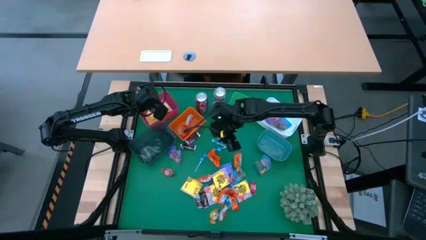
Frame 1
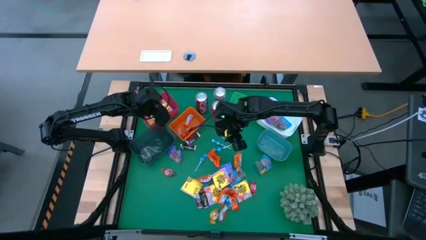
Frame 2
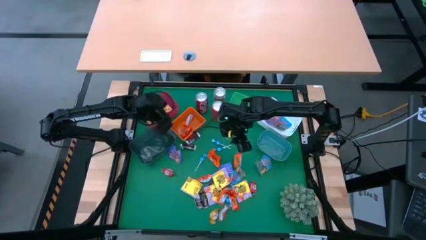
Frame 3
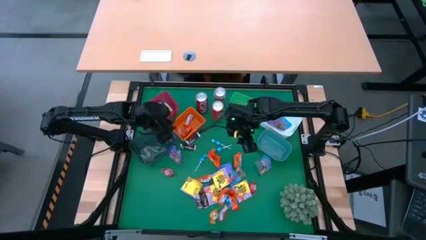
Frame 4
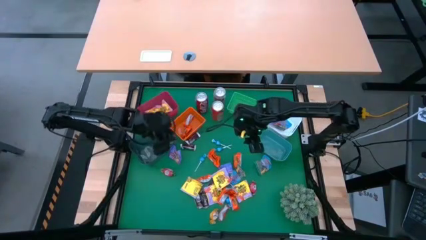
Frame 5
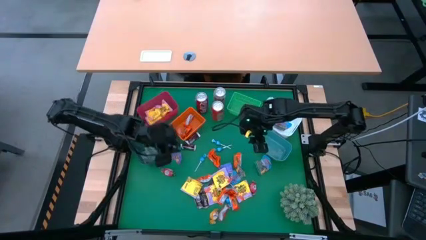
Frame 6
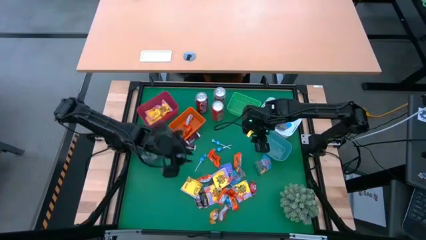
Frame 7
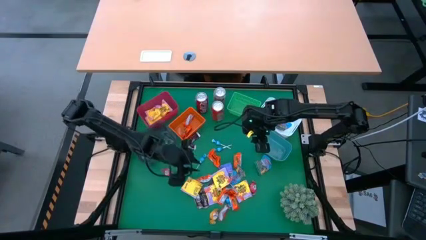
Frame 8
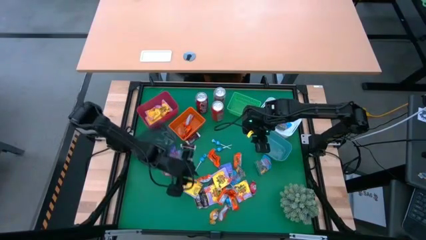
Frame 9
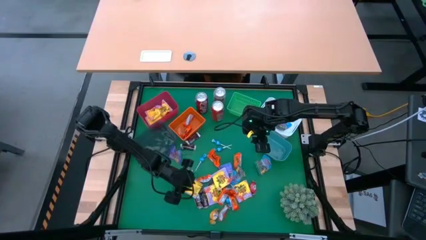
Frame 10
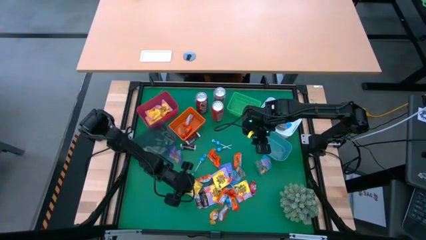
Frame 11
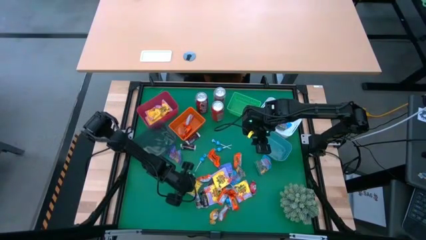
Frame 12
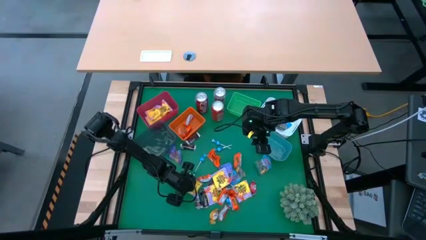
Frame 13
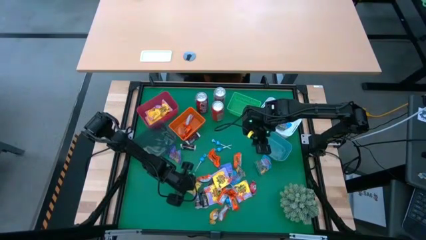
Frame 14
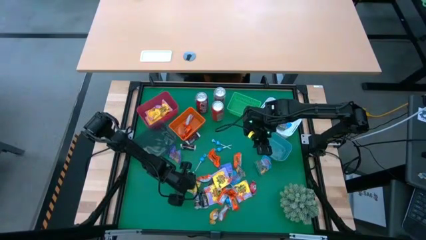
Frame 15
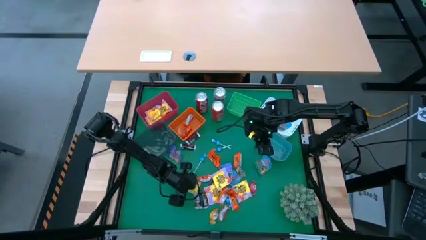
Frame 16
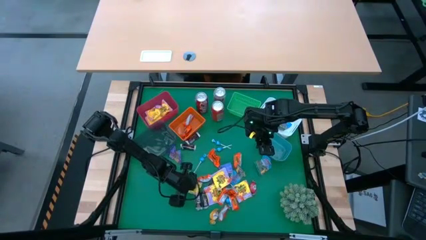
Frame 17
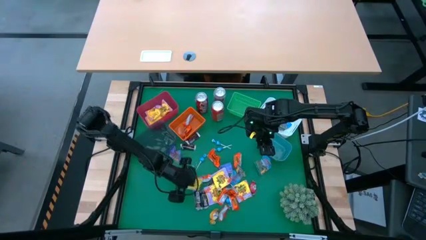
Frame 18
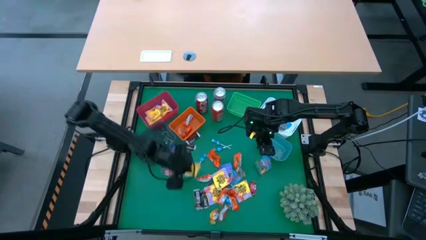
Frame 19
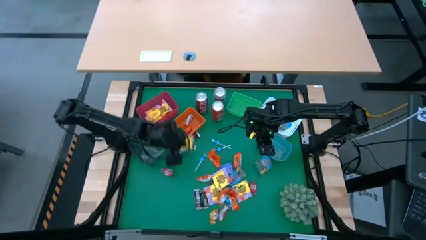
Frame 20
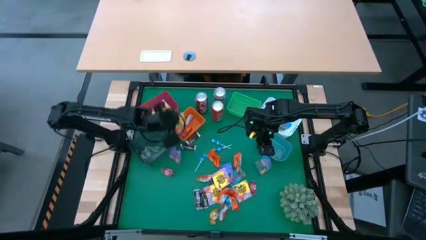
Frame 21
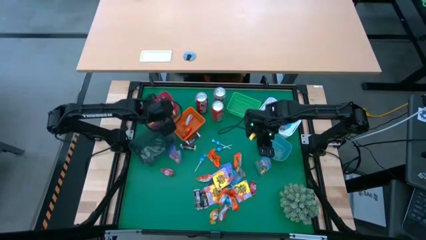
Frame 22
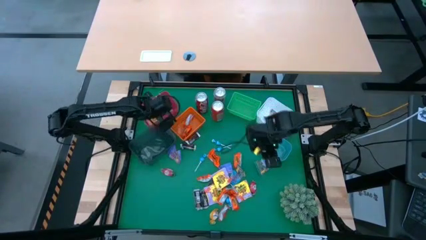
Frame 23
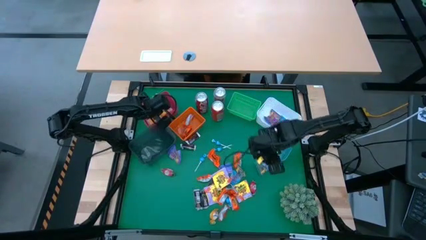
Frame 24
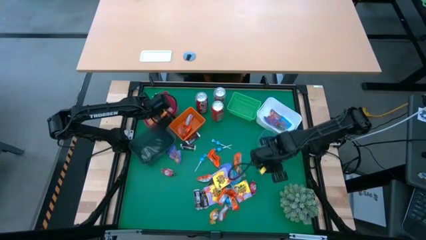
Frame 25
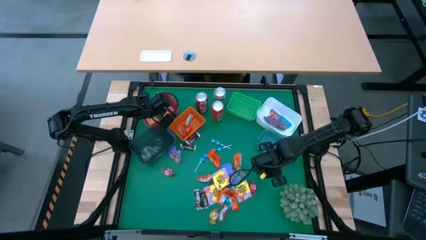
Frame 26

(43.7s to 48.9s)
Task: Sort candy
Put the yellow candy into the red bin

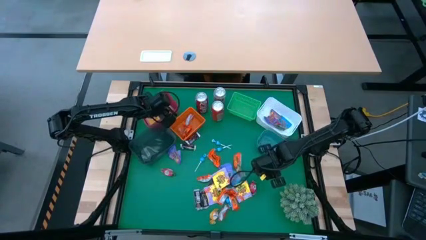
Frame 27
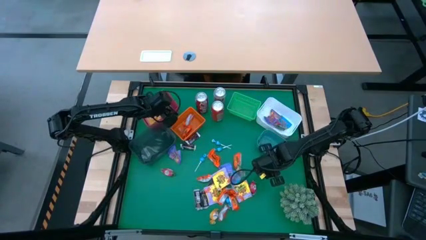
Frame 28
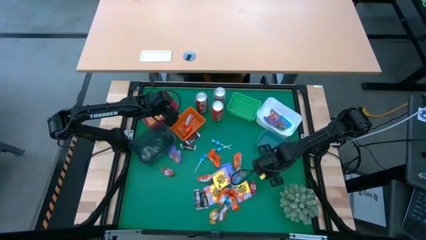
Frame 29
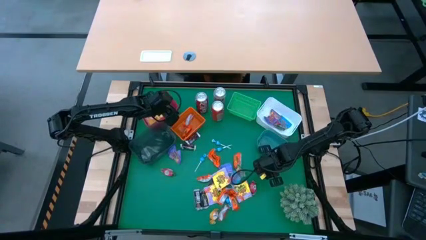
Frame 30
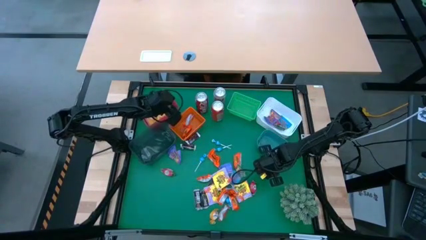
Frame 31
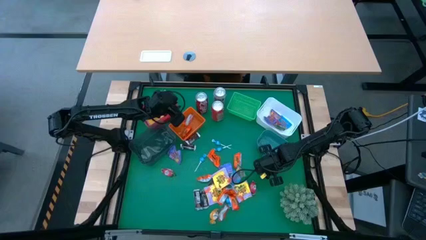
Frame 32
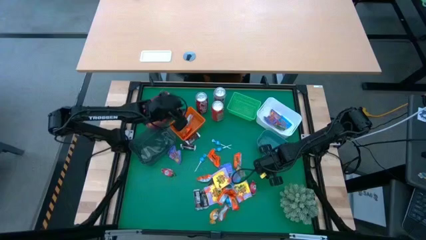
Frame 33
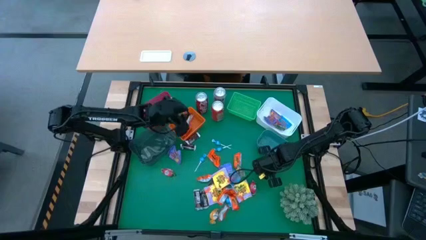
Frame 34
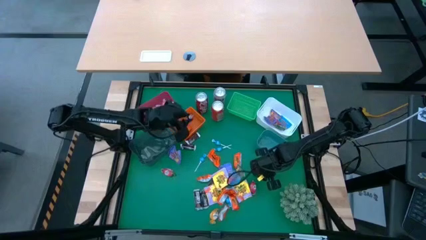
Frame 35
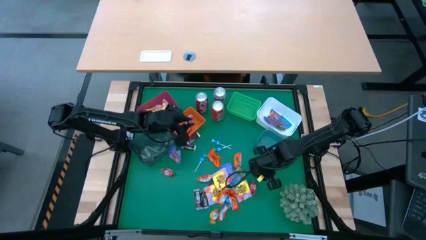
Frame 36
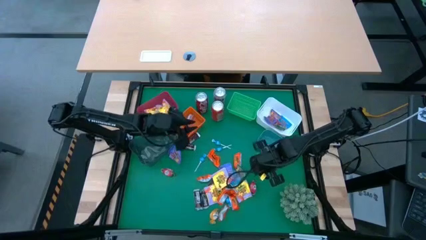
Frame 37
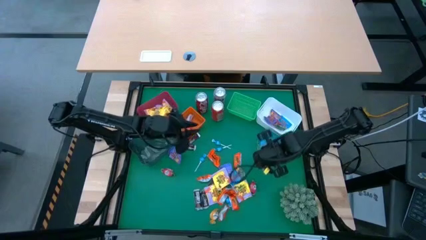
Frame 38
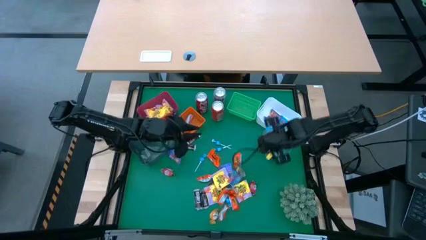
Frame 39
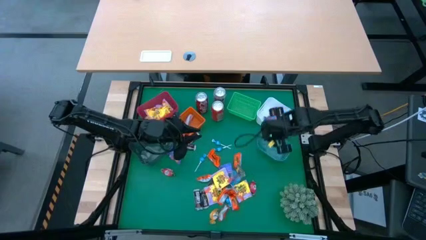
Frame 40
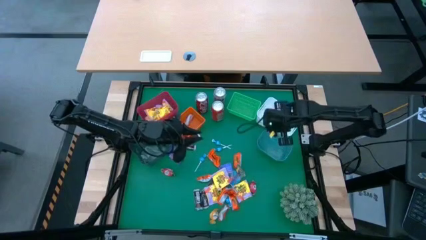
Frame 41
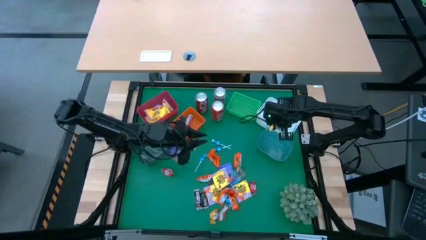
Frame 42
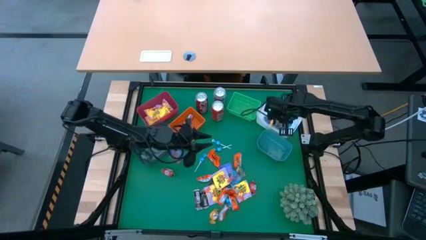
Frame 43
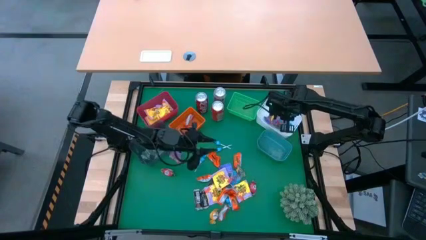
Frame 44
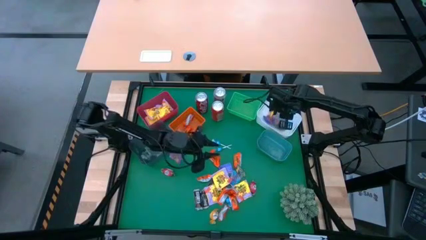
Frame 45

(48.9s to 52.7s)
Put the blue gummy into the white bin

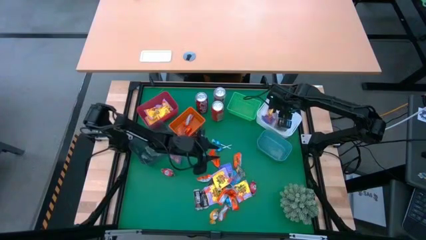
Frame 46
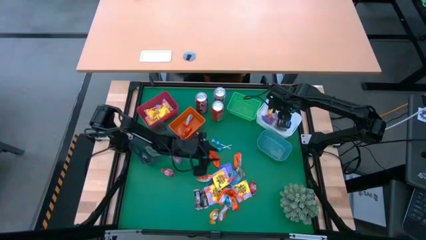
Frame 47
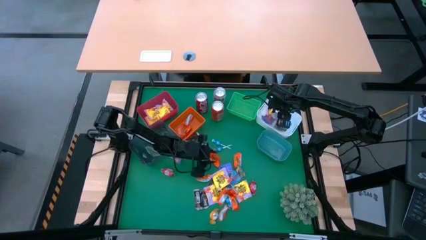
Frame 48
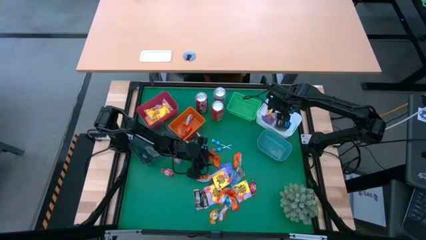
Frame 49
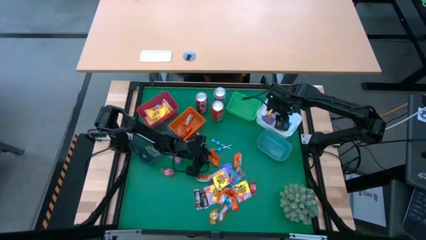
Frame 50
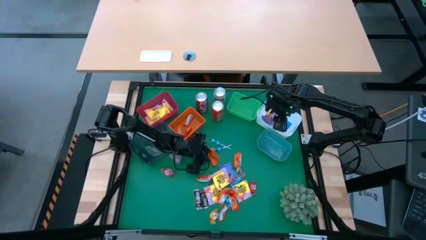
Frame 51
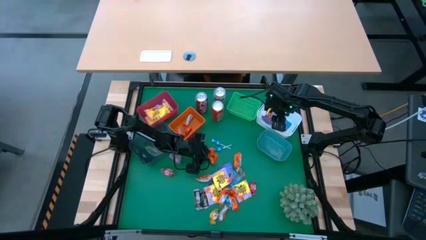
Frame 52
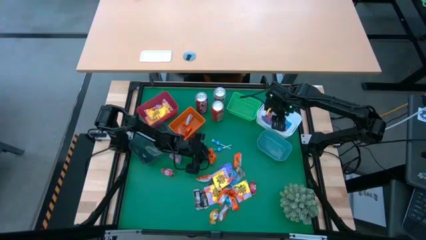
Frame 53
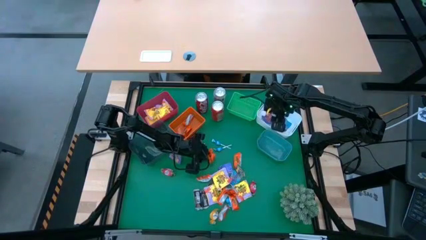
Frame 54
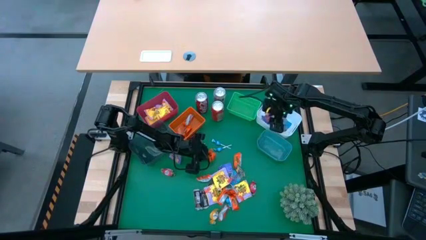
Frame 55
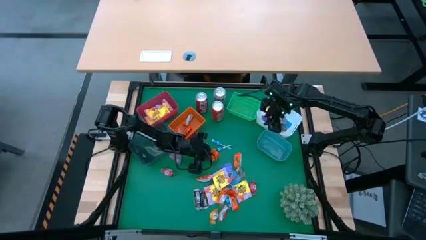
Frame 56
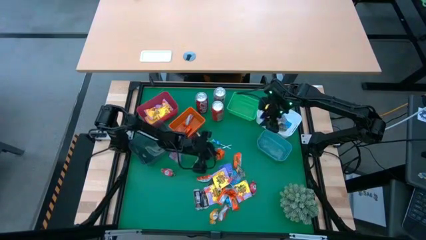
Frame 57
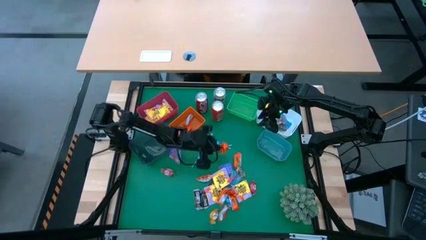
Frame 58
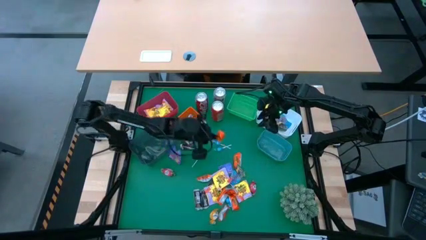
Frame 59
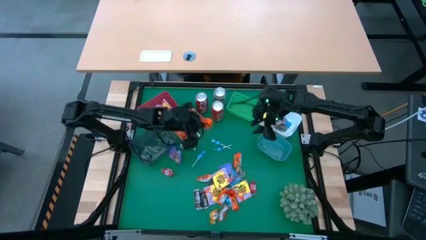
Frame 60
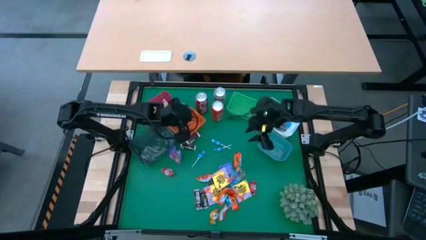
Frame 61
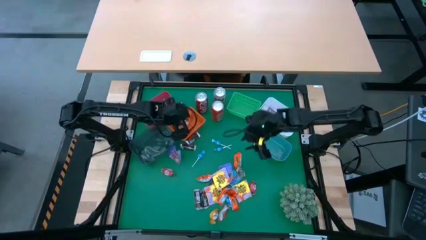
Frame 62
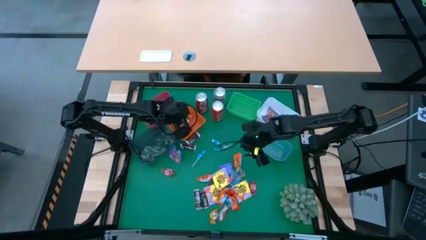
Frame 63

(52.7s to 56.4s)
Put the orange chocolate into the orange bin

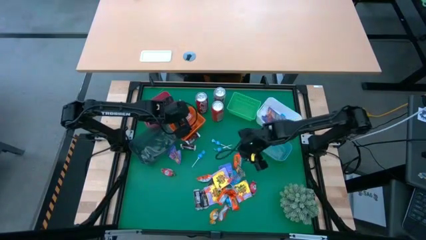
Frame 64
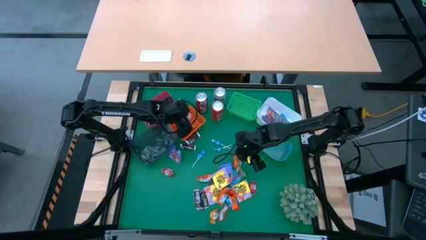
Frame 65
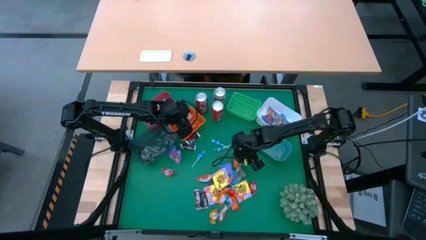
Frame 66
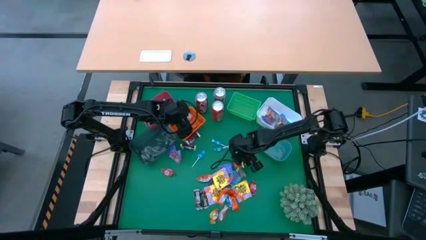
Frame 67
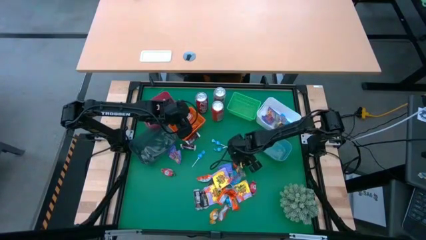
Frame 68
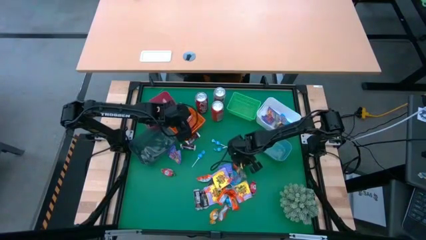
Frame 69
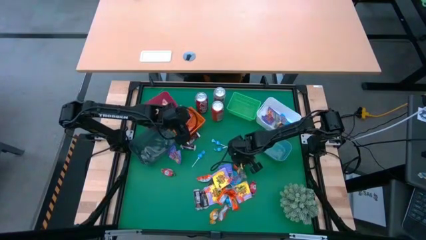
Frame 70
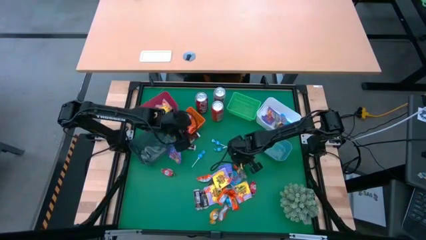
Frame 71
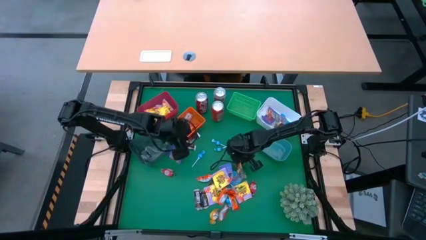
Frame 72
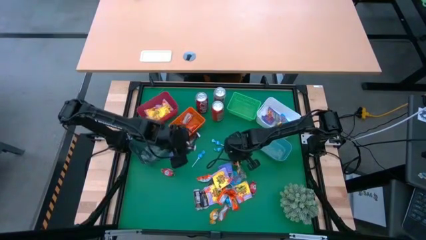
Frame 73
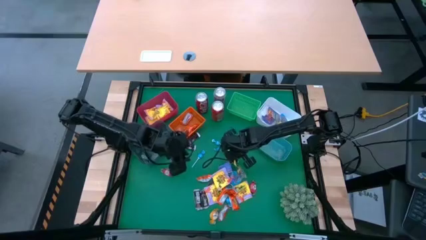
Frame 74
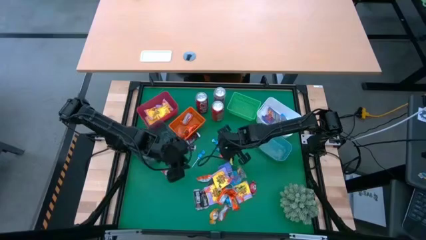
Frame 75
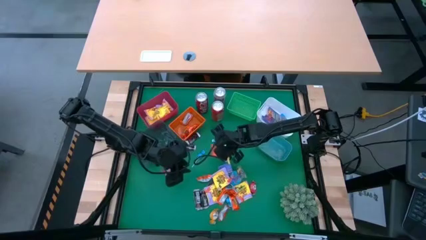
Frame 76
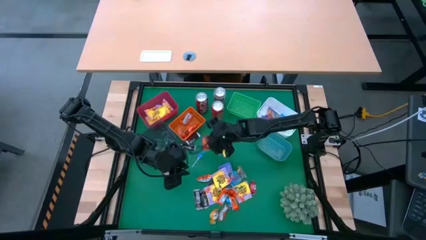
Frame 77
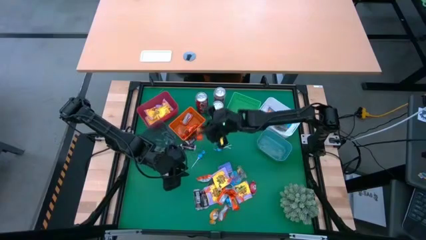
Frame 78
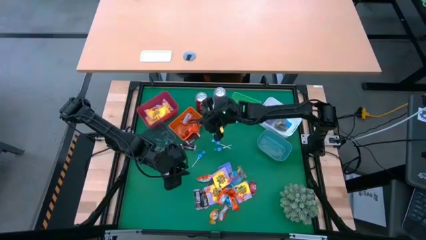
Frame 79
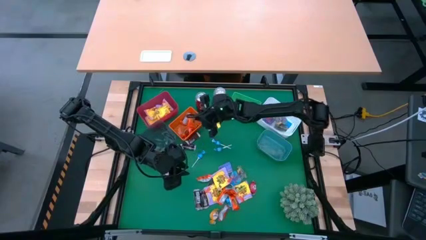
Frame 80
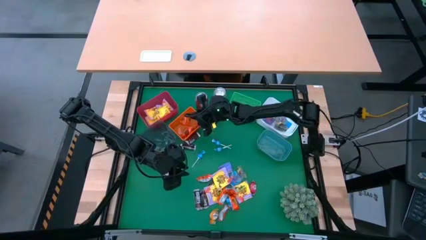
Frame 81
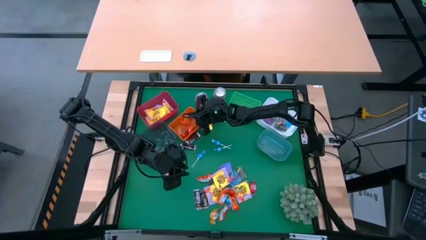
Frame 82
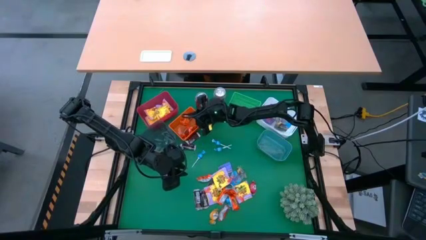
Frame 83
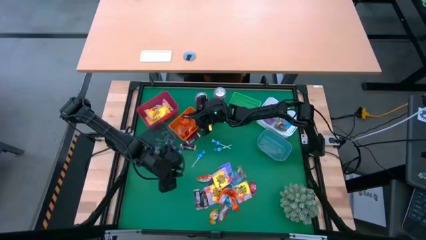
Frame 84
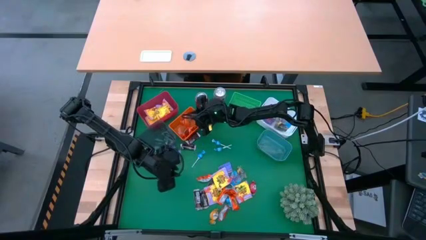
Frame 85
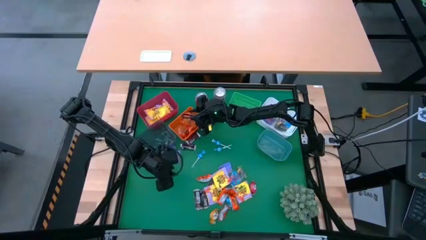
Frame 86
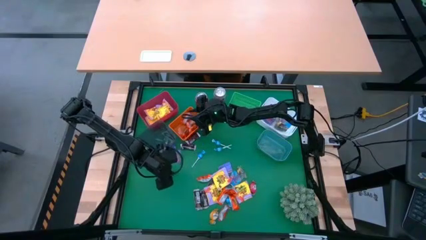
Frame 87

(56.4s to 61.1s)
Put the orange chocolate into the orange bin
